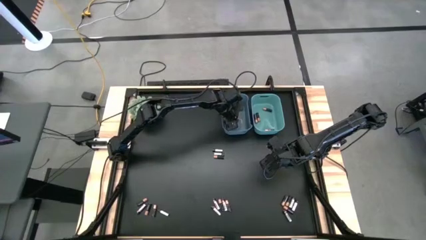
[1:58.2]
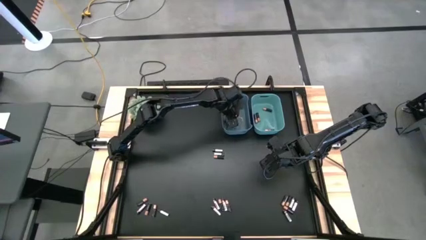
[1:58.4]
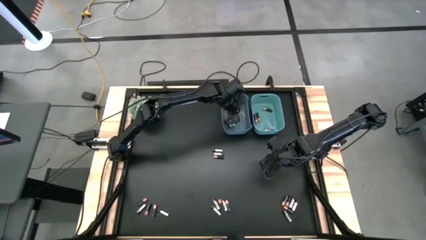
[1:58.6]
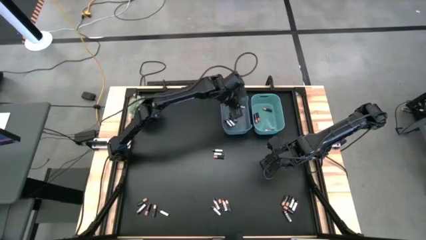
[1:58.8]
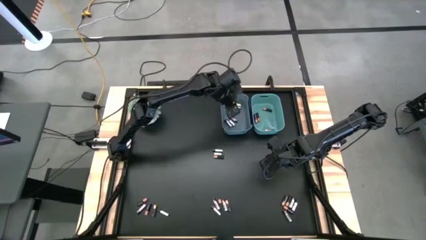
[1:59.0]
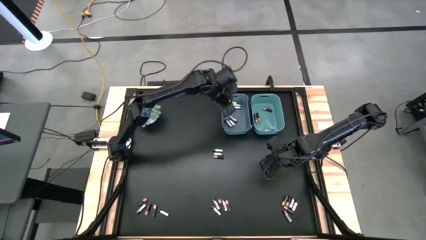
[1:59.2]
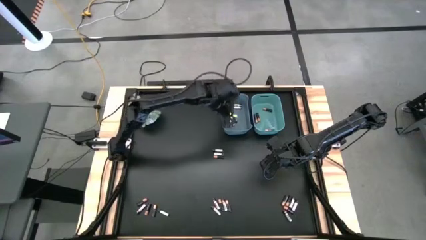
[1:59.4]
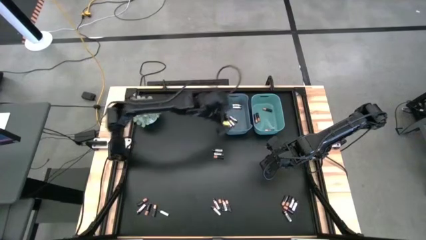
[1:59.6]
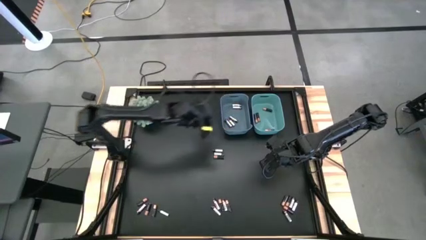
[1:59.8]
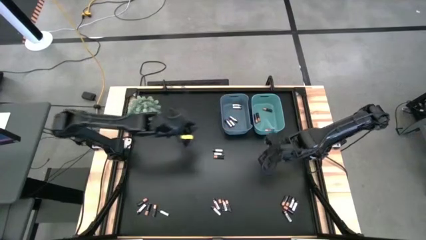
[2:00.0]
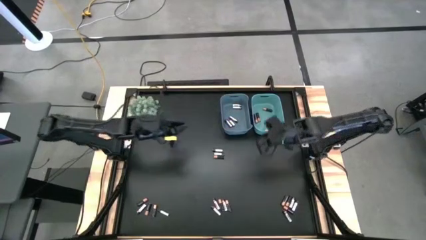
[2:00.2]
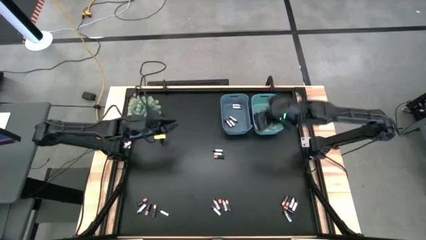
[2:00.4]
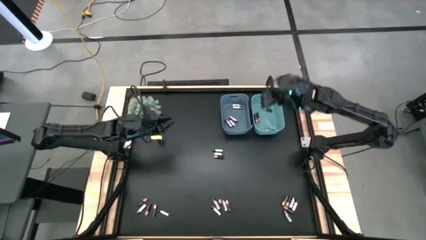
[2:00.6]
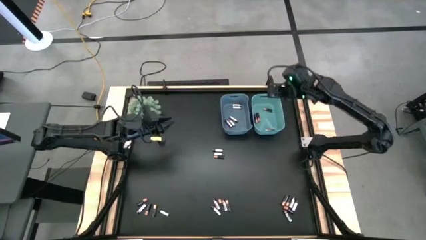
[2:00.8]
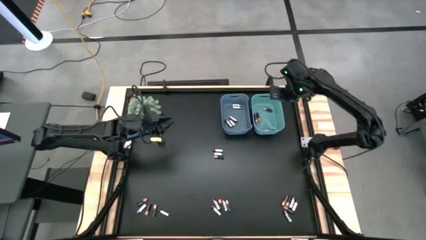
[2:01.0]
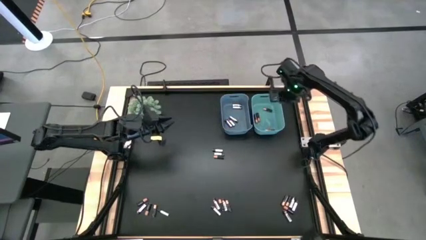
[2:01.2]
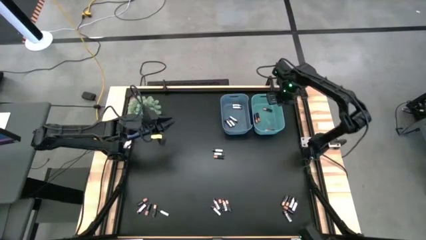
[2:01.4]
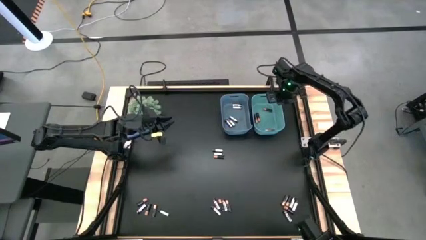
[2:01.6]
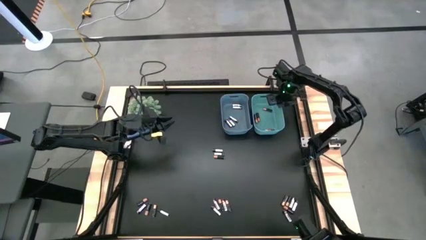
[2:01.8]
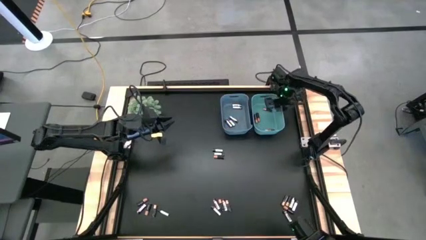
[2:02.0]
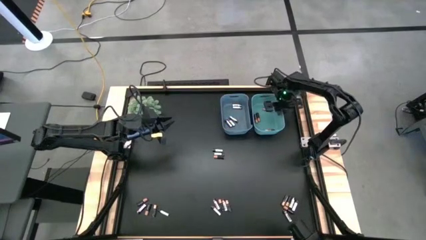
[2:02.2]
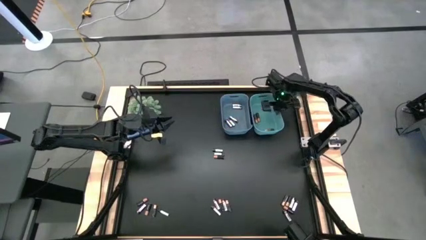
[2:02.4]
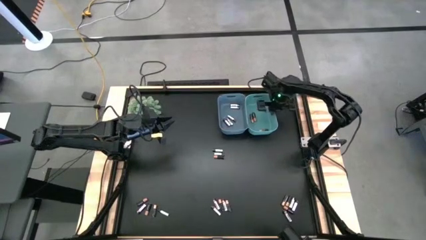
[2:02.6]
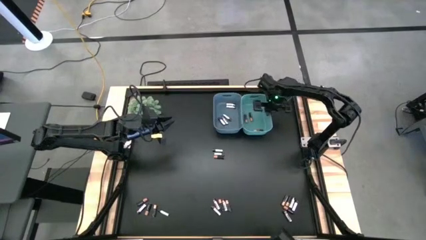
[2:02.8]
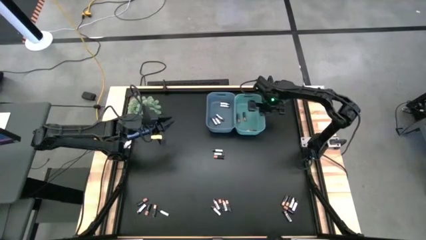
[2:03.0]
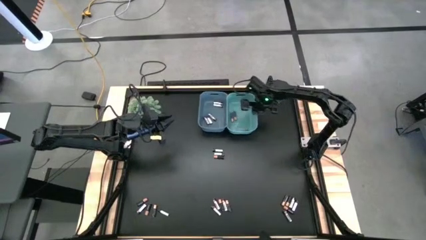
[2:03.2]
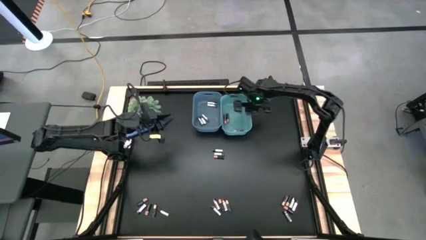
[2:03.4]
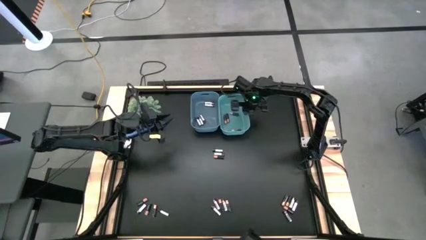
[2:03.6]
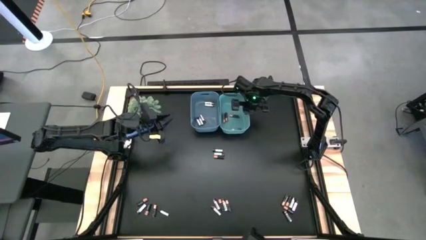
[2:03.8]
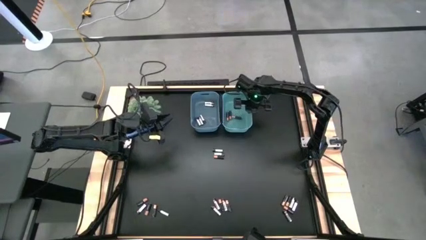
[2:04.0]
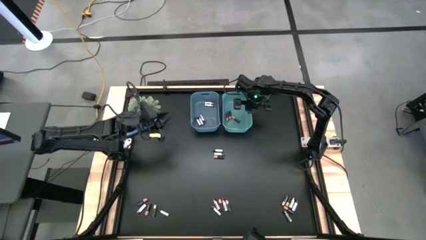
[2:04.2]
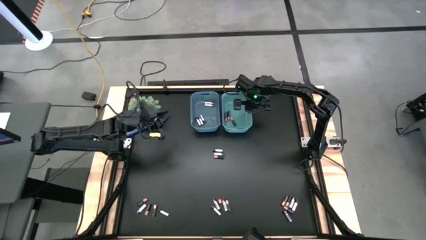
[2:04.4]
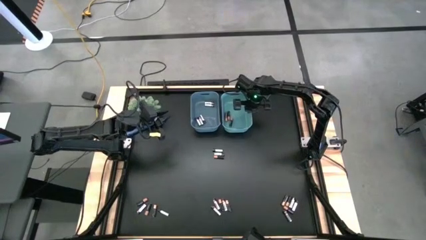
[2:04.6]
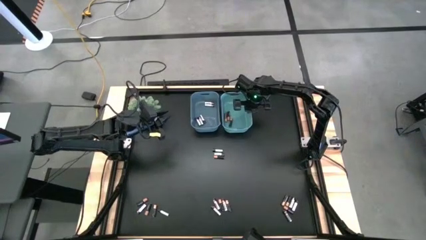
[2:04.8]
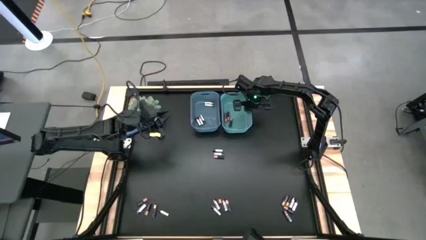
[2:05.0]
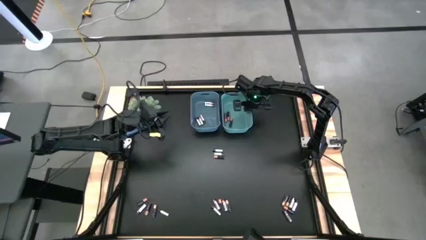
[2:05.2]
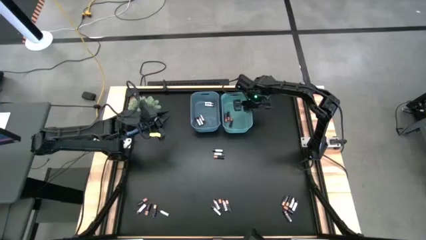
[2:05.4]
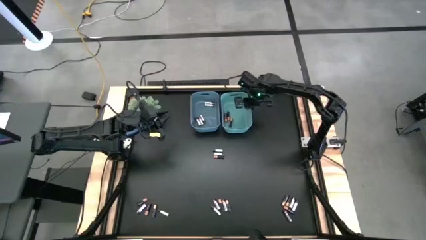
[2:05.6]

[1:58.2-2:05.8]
Task: Sort batteries
Move the bins to the top middle of the table

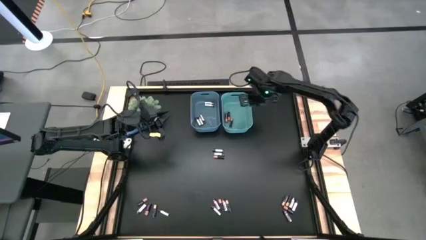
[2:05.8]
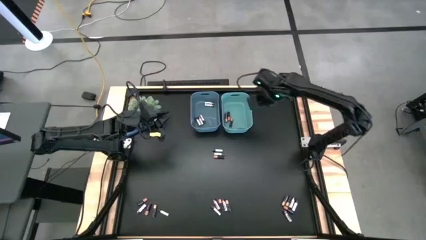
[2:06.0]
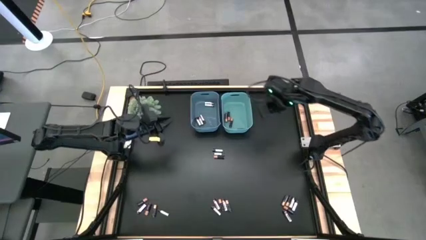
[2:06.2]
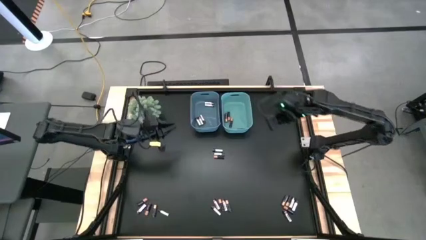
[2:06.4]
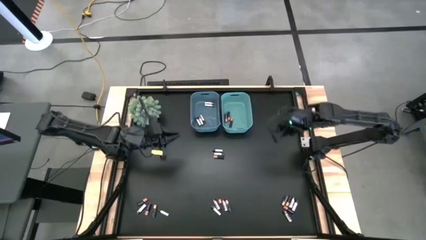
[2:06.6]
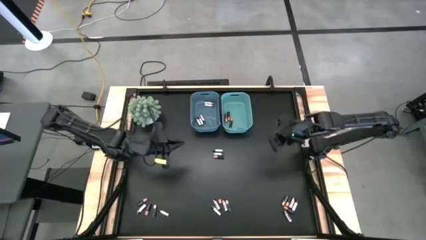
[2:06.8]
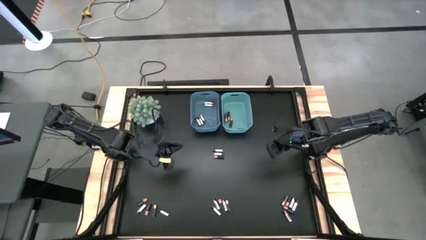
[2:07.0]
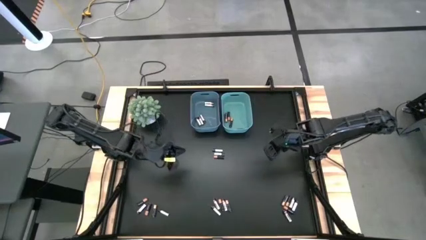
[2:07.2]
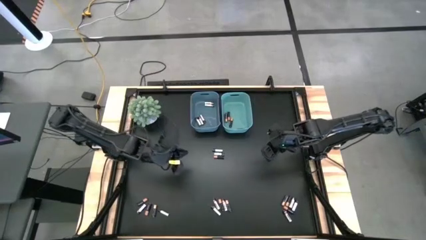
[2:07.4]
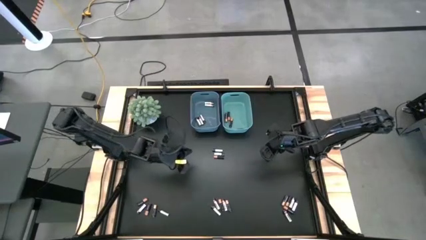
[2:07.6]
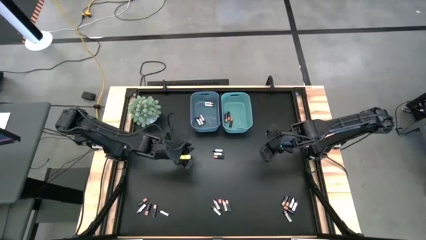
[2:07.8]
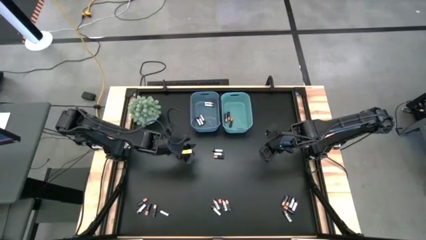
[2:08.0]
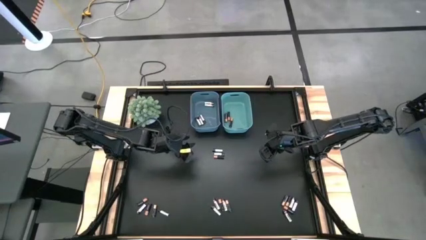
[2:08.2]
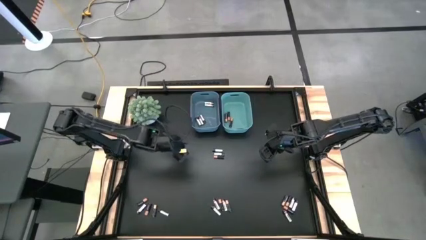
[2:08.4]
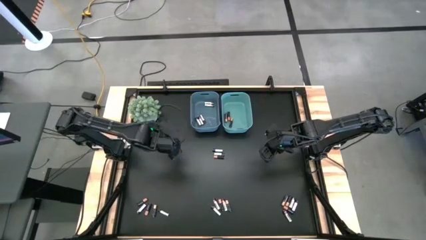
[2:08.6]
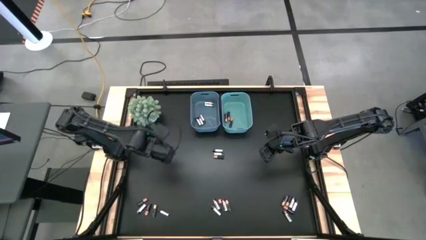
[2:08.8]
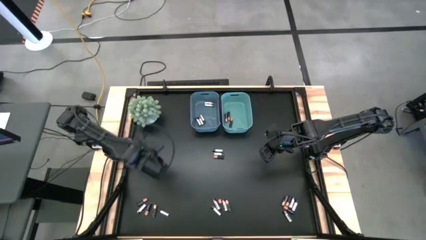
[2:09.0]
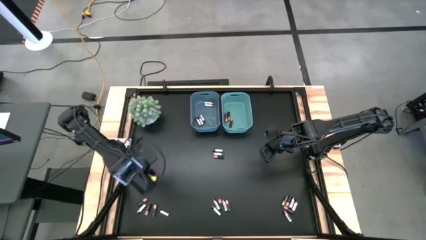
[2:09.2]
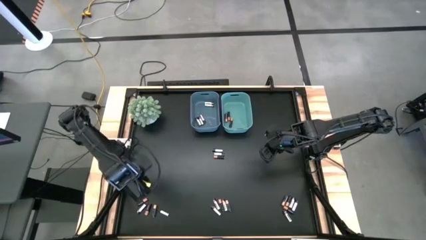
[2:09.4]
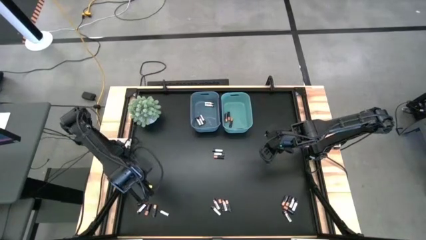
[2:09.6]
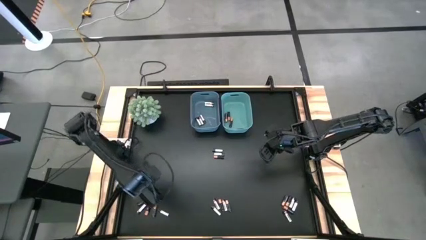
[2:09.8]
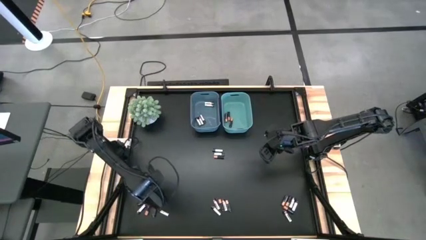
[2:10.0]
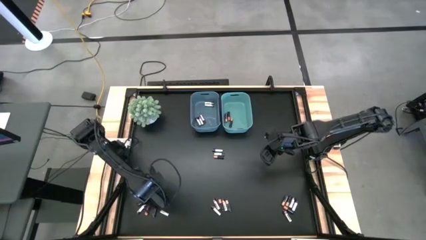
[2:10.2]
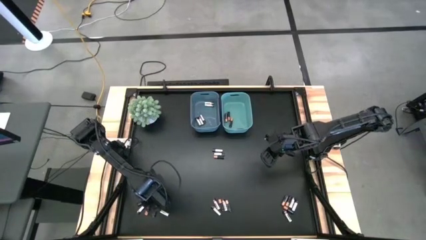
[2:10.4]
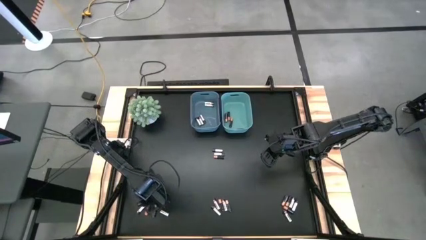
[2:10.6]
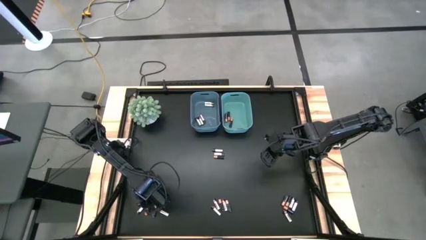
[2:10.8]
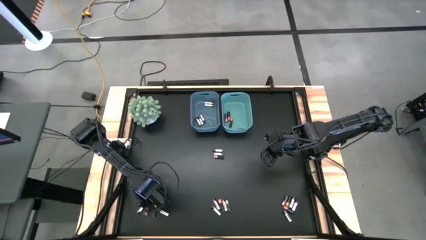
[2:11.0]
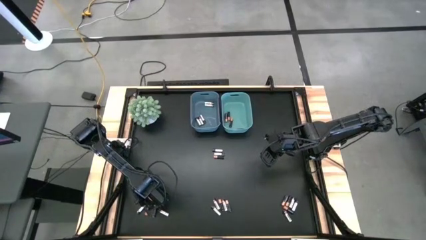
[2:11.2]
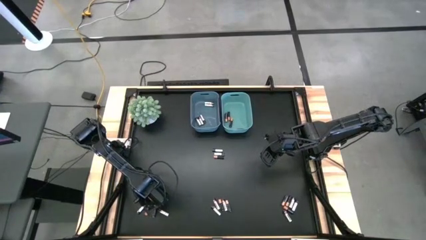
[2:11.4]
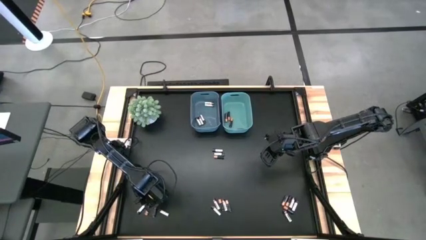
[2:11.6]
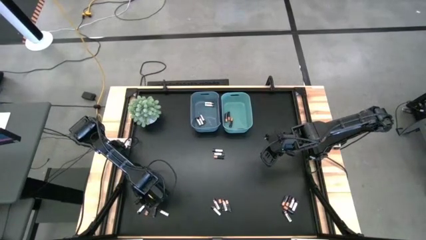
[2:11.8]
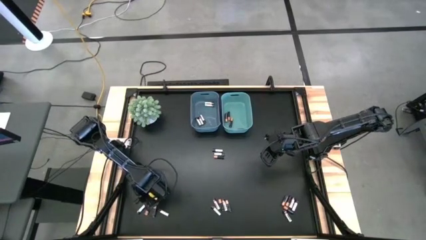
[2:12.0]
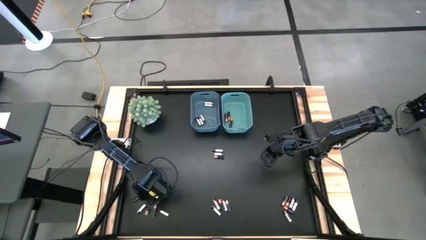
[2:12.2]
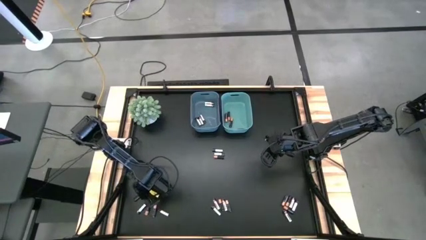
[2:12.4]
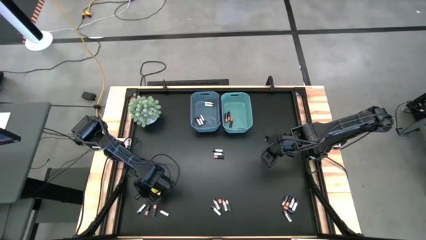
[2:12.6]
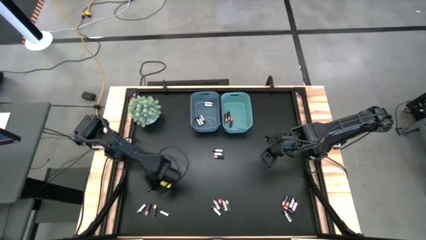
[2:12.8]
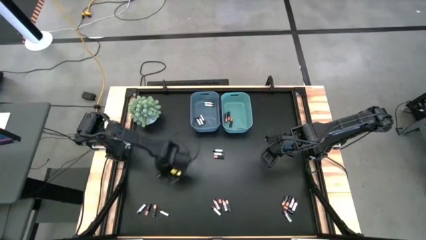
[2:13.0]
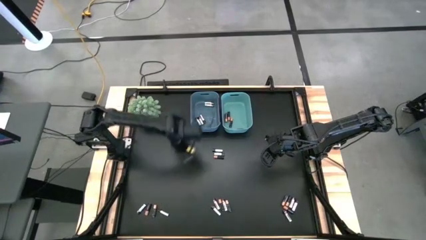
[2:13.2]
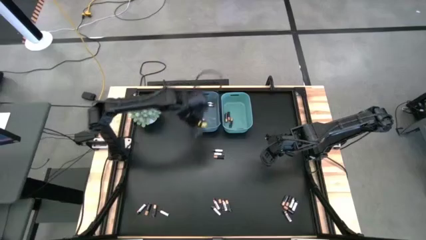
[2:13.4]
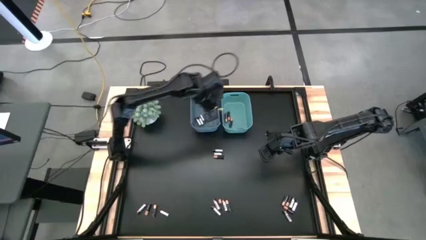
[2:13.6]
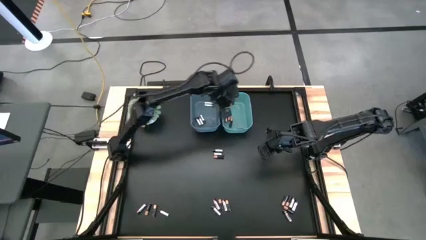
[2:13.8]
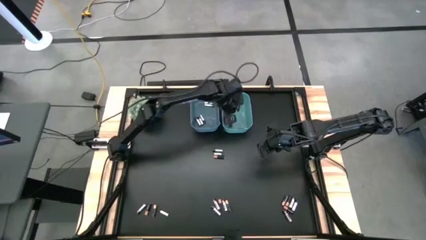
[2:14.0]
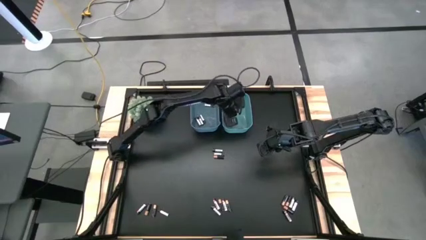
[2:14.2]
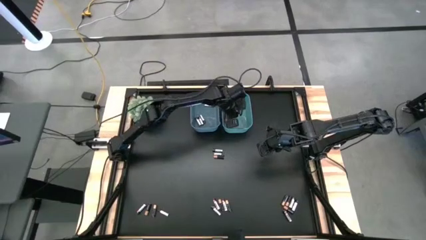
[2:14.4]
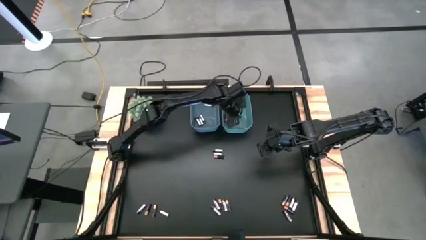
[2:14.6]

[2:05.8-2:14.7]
Put the black battery into the green bin

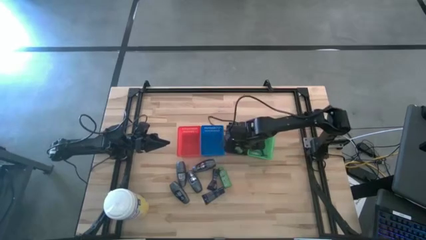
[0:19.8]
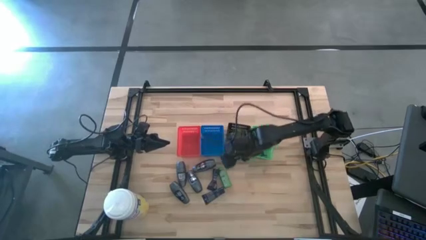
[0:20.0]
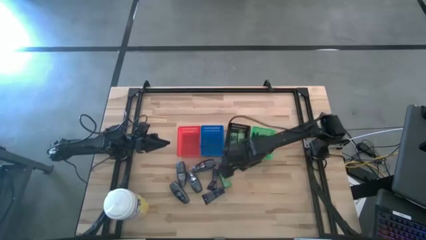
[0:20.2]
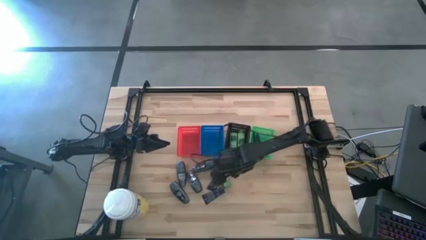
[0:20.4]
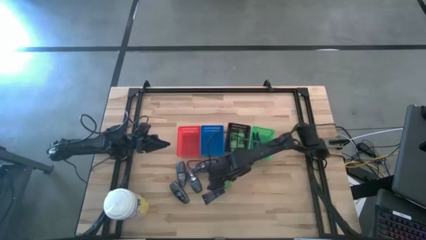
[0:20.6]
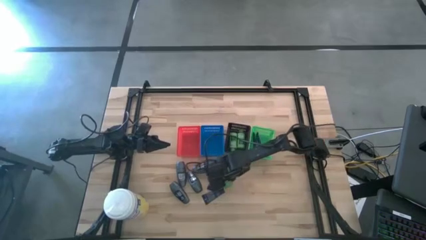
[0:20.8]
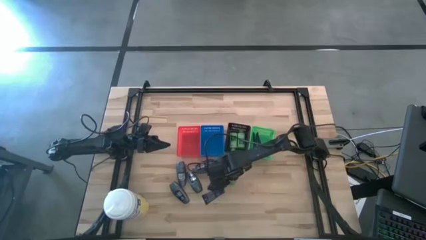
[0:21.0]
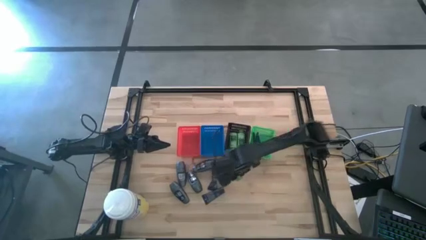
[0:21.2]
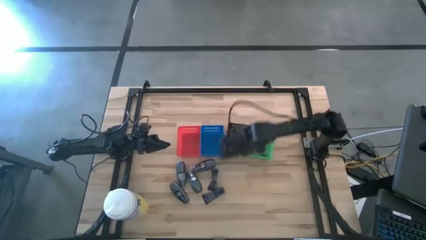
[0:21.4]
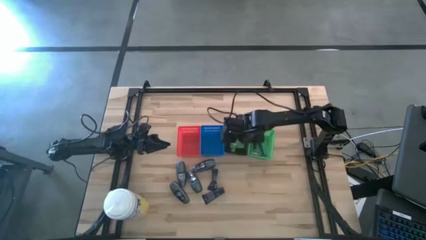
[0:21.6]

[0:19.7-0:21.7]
Task: Pick & Place Travel size toiletries
Put the shampoo into the black bin
